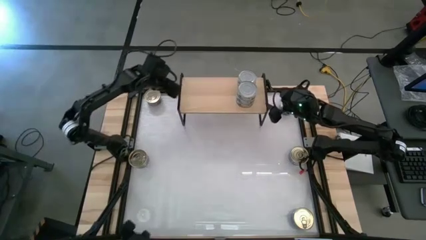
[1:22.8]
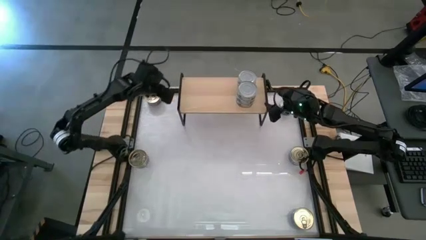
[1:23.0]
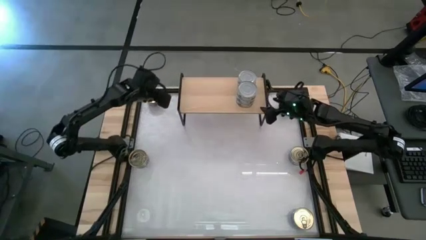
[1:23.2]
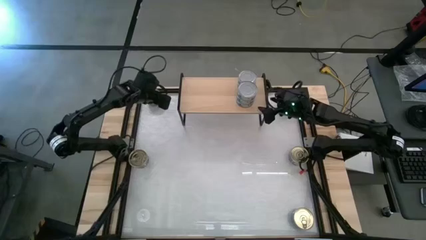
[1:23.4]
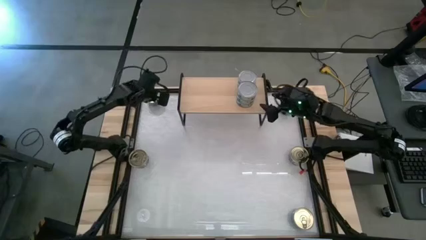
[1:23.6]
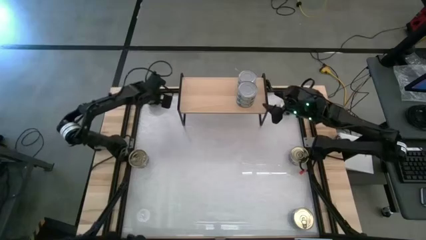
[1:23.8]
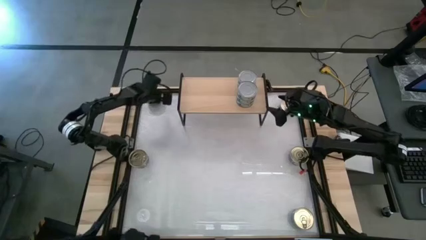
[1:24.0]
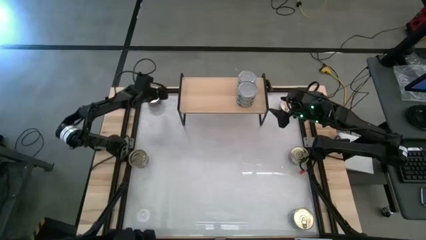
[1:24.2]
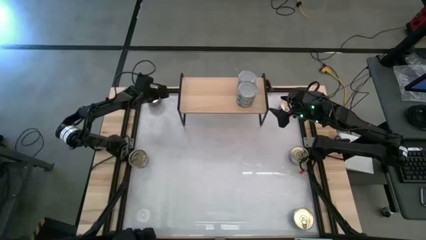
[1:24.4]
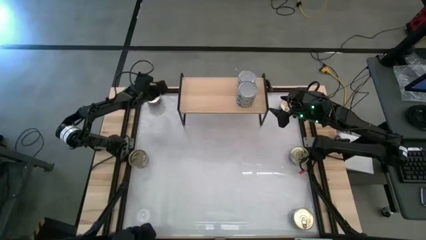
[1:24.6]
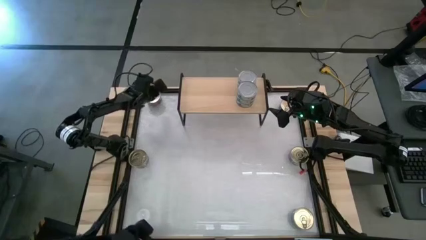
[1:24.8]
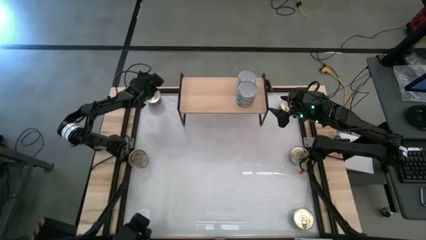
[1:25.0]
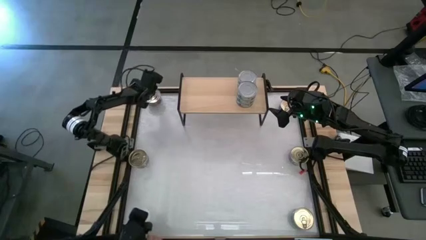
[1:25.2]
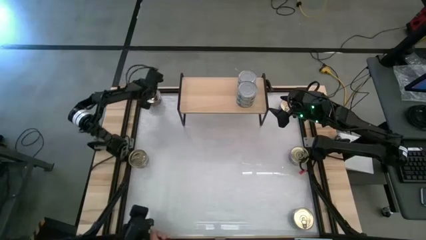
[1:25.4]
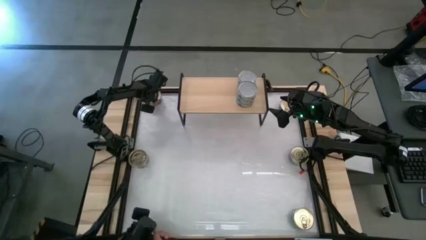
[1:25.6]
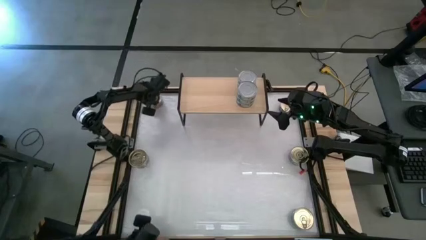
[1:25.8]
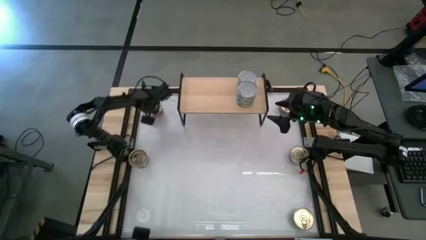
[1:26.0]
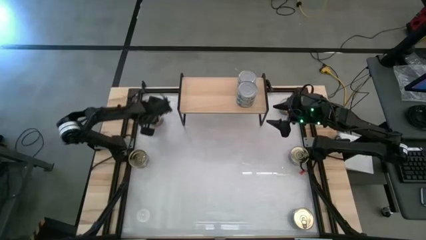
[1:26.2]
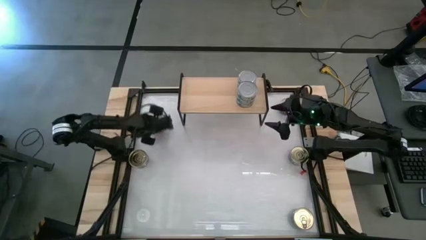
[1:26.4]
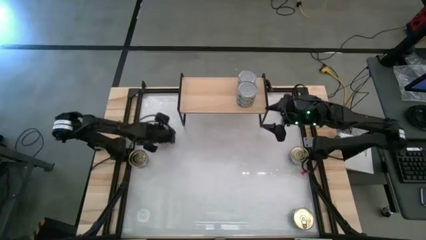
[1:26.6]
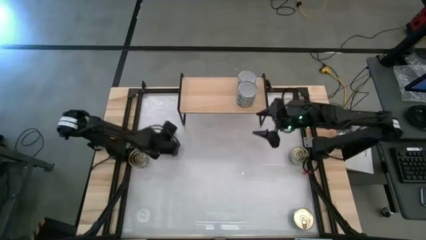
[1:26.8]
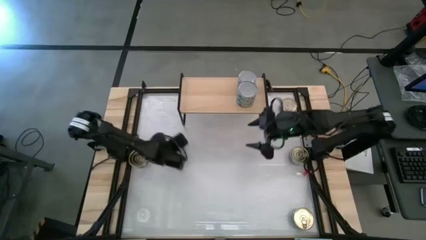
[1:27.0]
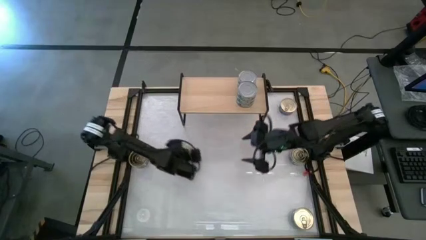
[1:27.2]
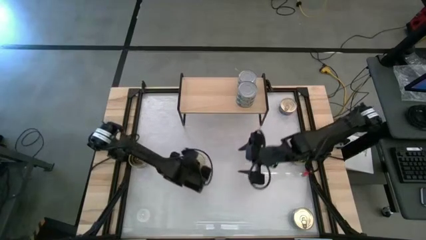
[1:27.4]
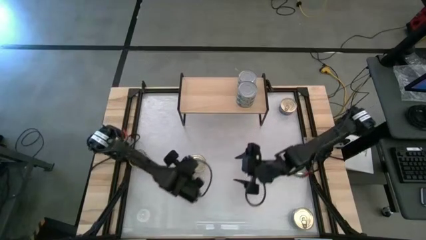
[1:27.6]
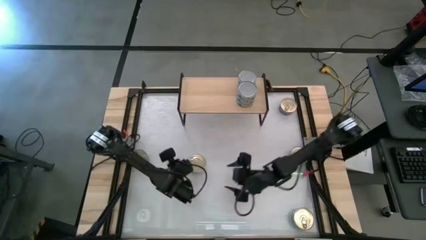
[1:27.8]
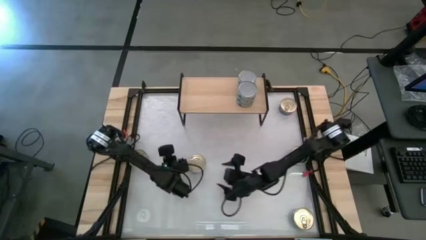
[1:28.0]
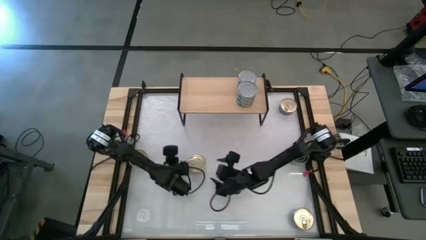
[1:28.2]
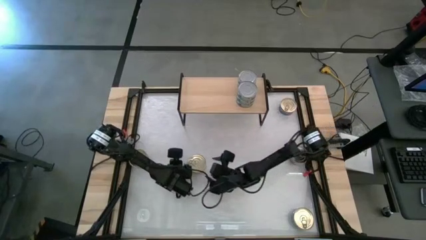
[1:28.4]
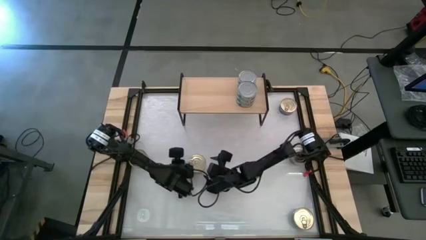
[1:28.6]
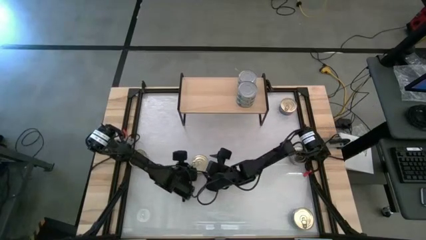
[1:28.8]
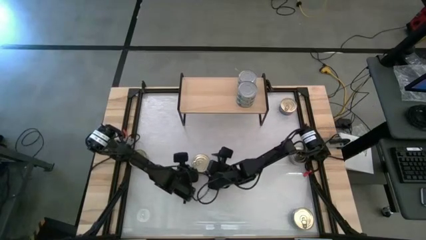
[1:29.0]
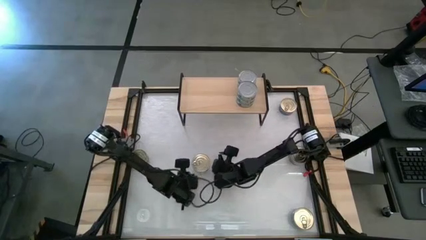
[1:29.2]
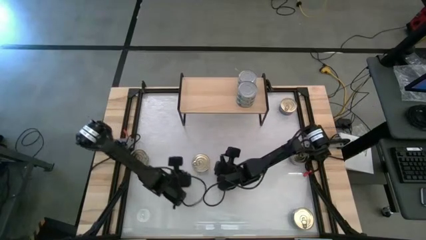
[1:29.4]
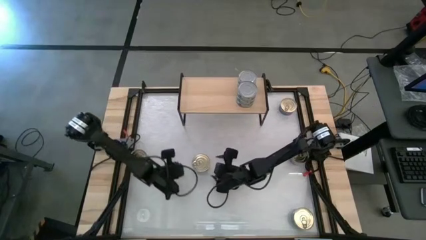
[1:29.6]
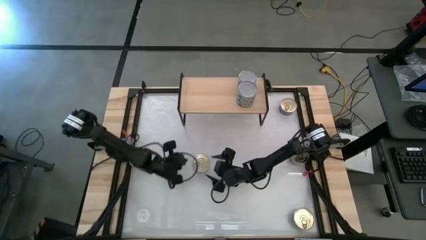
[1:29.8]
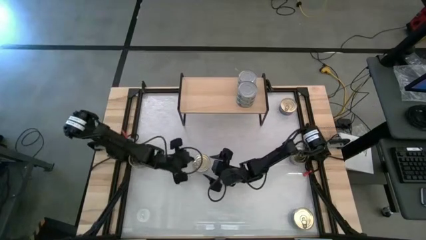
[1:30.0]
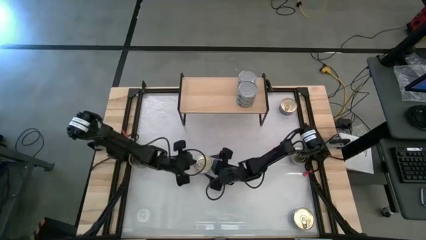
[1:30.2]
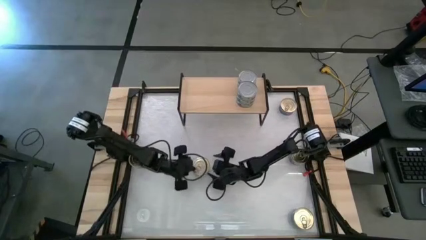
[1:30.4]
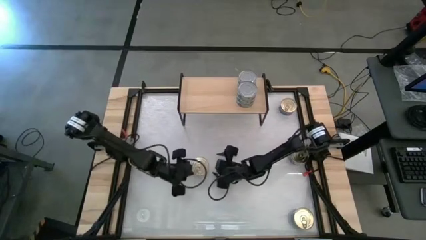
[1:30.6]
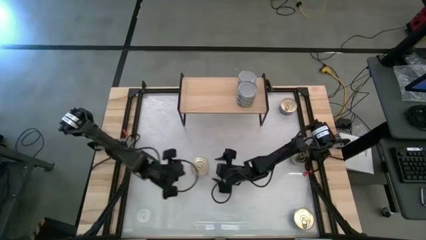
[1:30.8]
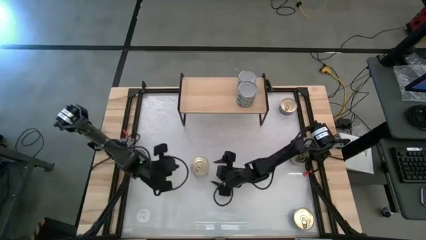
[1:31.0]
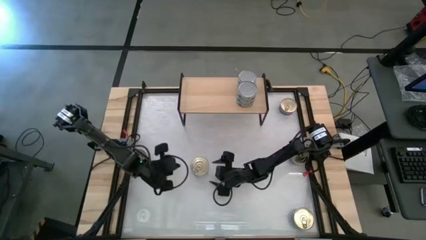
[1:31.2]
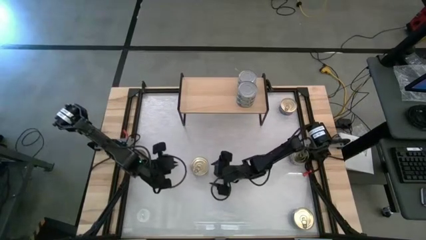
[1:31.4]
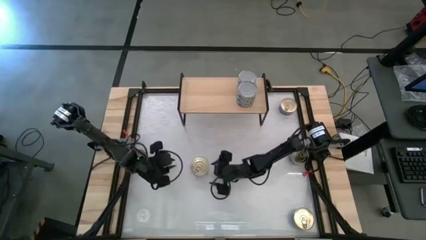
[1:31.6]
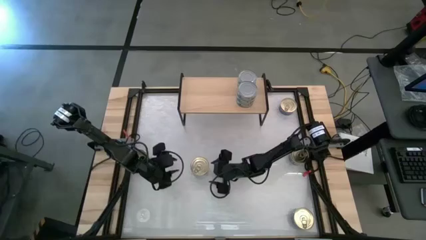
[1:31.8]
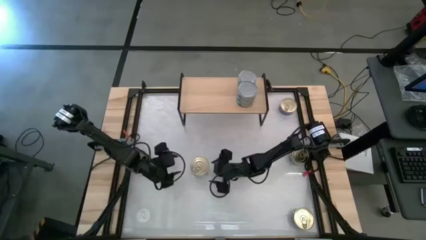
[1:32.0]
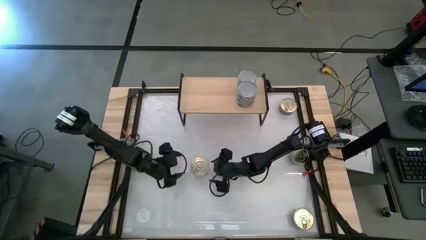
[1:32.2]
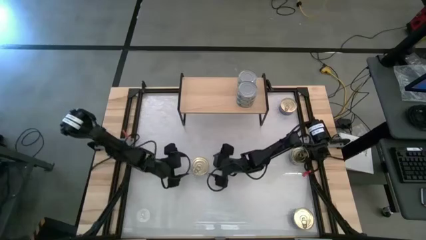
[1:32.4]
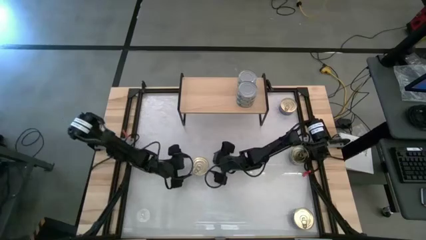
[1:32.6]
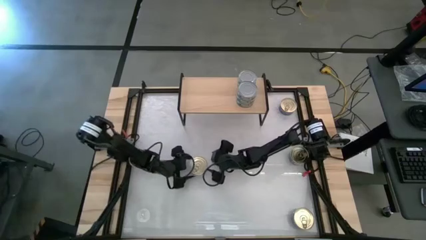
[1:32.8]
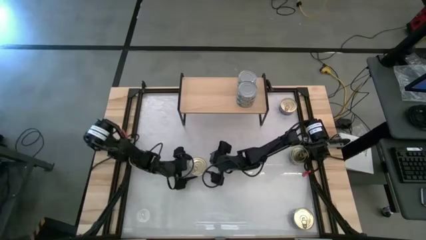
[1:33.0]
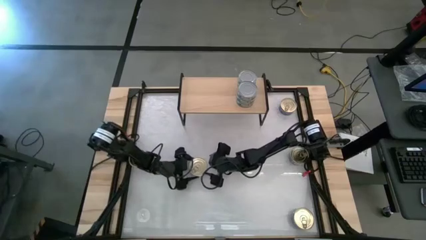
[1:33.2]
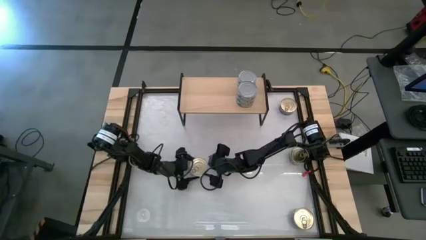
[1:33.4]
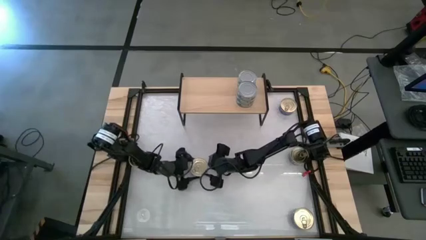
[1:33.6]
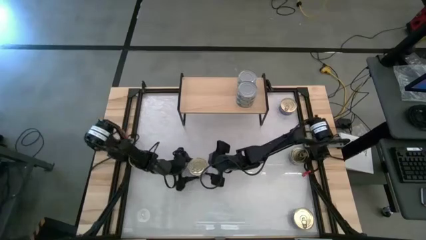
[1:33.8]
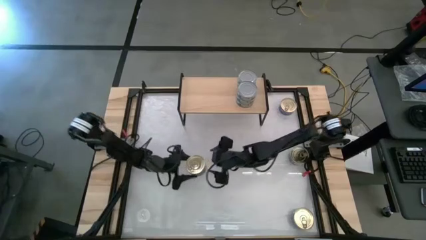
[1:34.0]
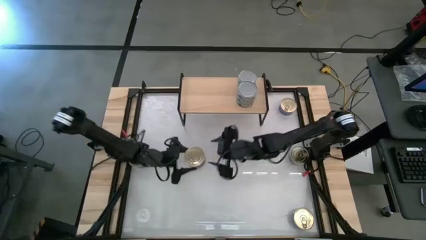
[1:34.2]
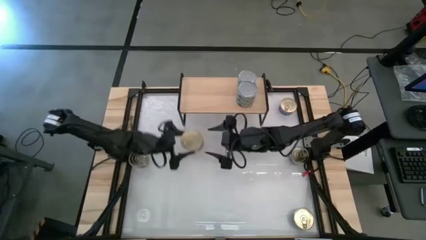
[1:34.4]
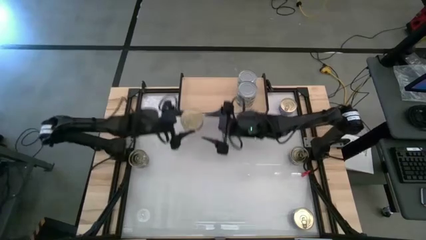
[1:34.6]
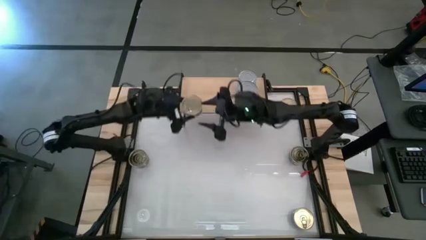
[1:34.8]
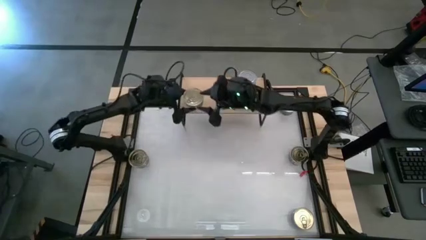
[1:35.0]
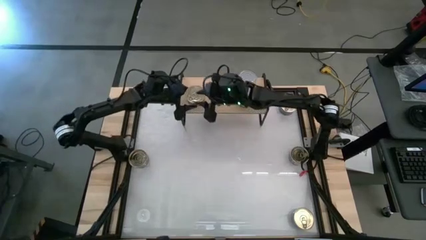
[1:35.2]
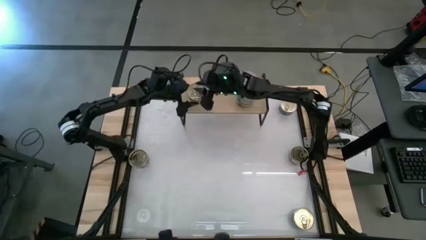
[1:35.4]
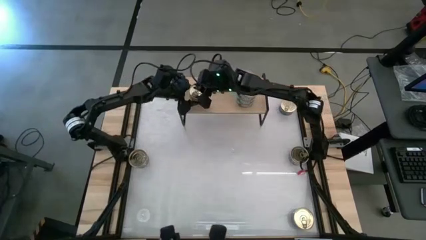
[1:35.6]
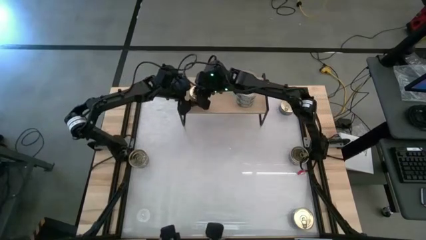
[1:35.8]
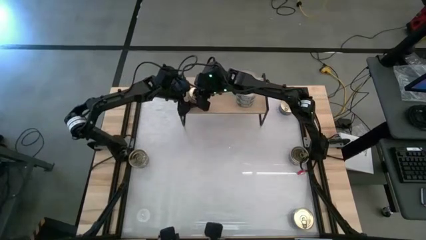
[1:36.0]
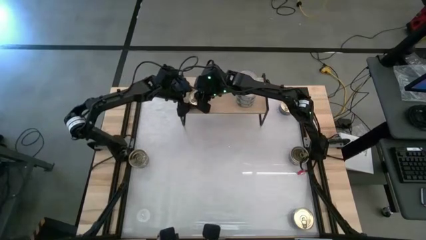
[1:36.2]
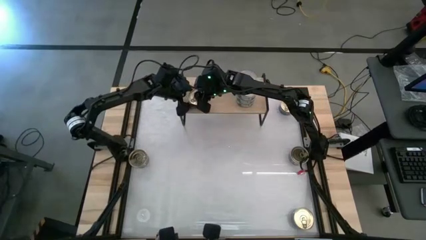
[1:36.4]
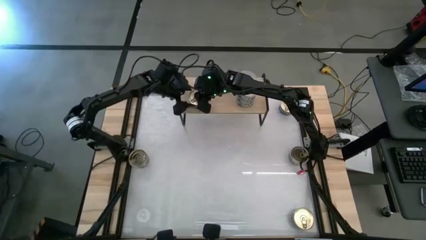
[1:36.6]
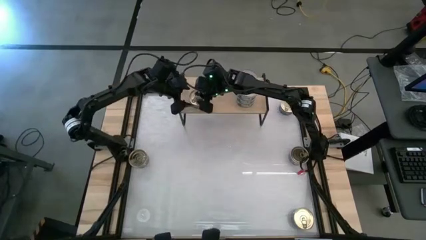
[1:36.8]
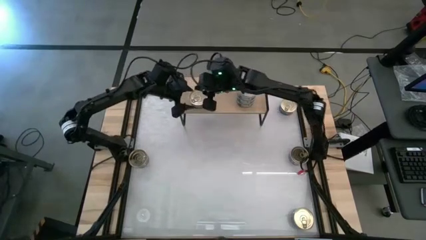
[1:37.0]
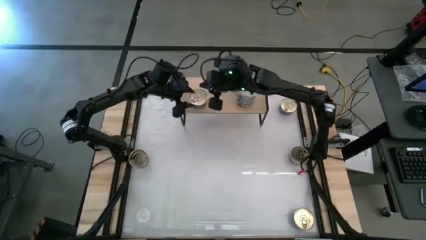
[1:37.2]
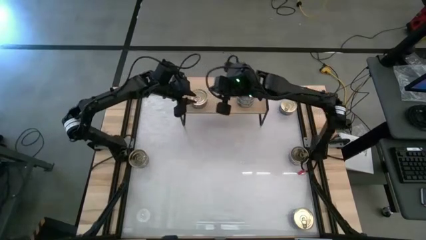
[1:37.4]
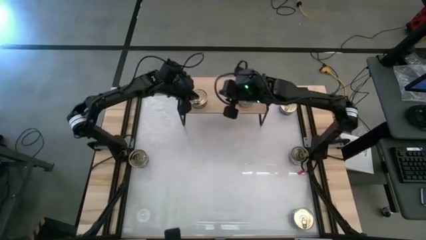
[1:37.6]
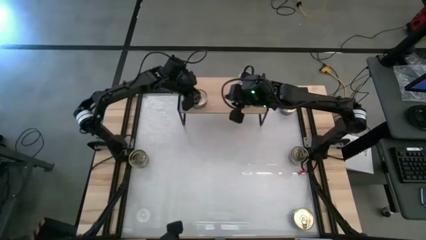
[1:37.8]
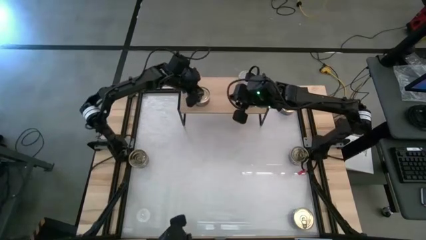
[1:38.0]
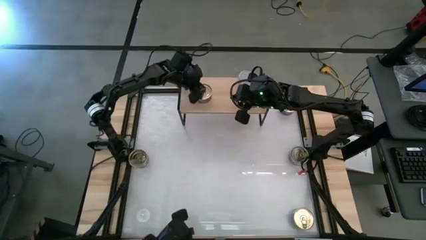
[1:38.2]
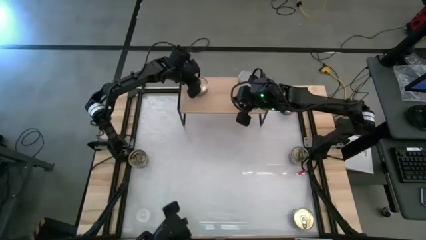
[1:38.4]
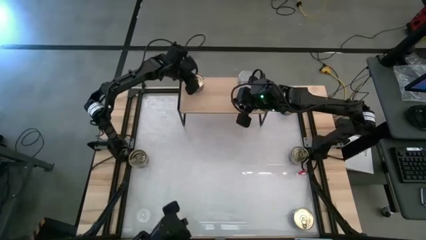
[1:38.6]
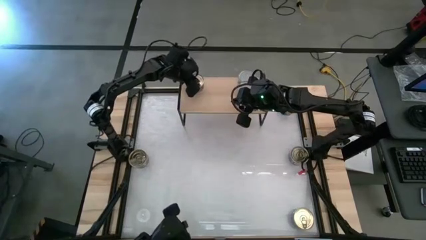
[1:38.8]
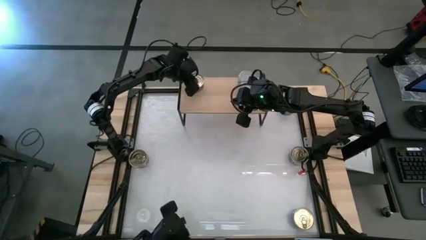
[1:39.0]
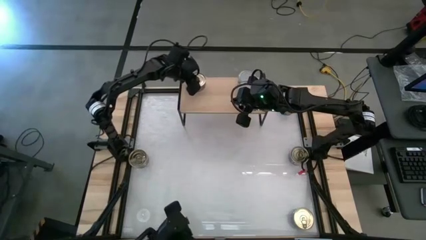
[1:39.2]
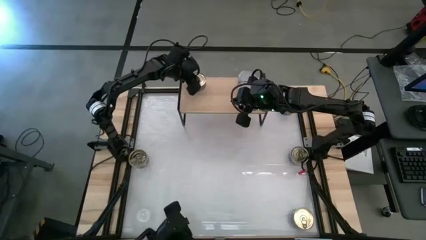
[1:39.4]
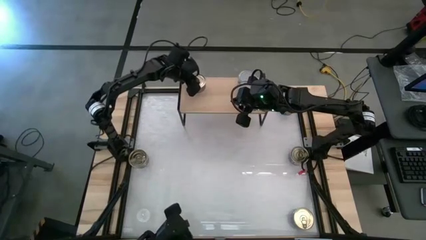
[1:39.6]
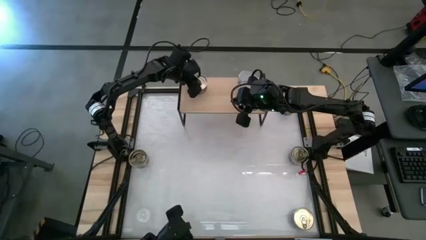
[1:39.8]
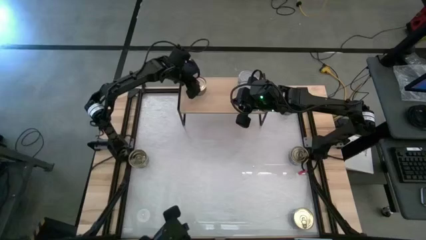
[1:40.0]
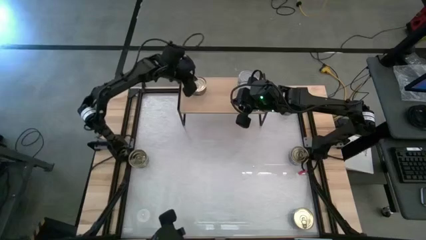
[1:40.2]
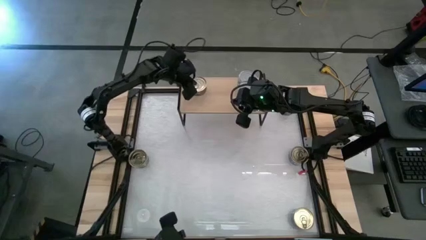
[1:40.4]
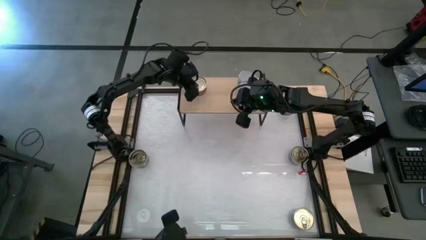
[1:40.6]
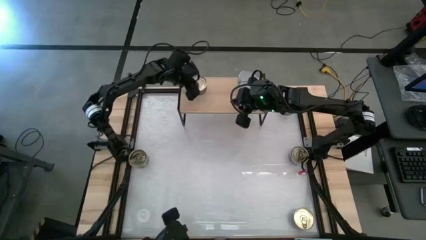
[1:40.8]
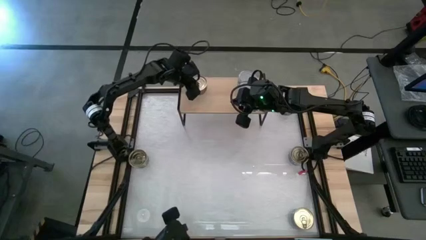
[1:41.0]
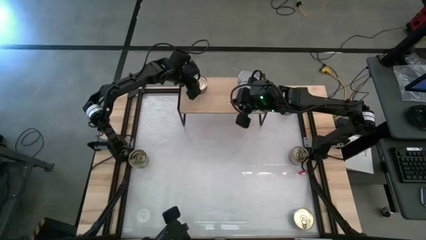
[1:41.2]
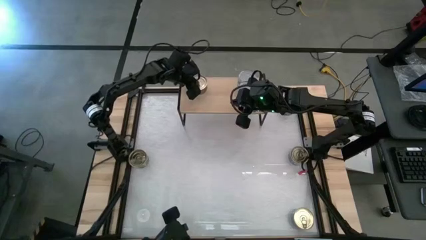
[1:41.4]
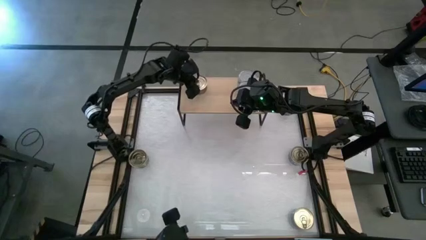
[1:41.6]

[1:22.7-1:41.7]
Task: Stack canned seafood by type on shelf
Put the top left blue-pink tuna can on the shelf
